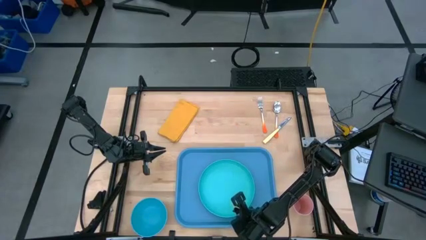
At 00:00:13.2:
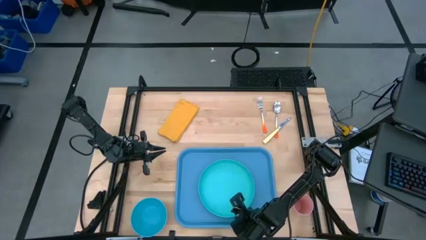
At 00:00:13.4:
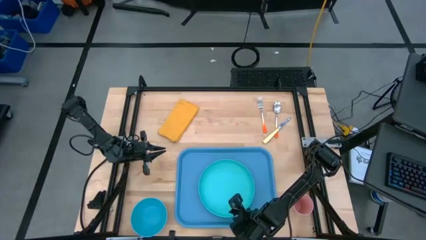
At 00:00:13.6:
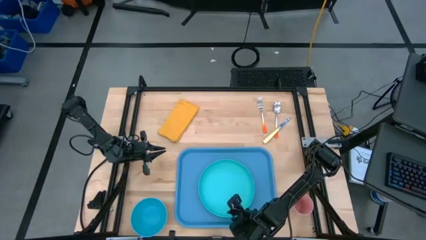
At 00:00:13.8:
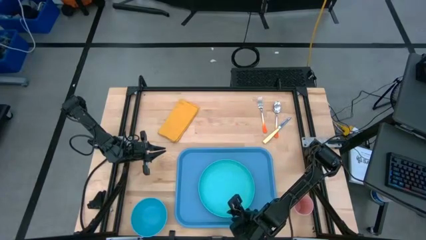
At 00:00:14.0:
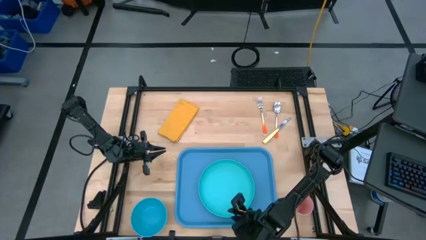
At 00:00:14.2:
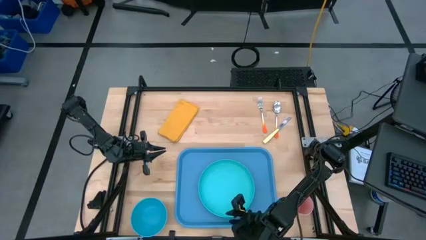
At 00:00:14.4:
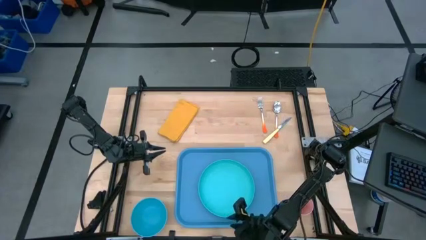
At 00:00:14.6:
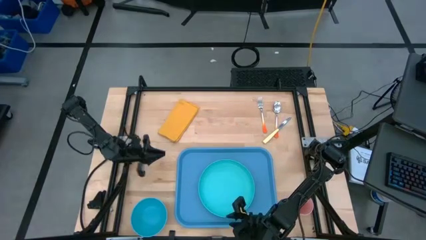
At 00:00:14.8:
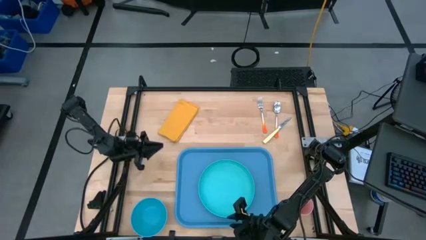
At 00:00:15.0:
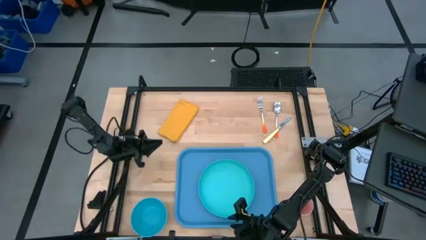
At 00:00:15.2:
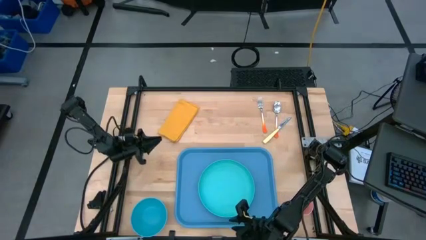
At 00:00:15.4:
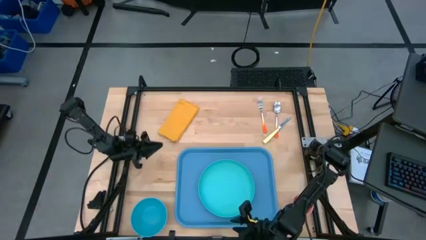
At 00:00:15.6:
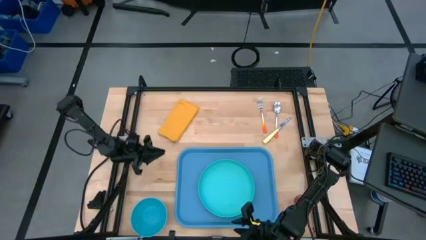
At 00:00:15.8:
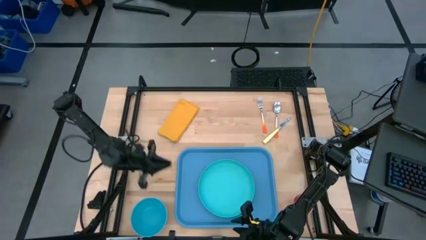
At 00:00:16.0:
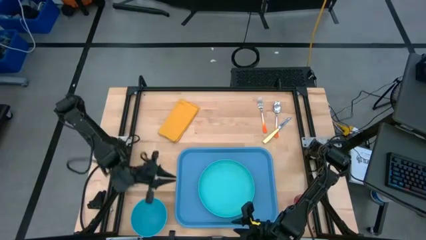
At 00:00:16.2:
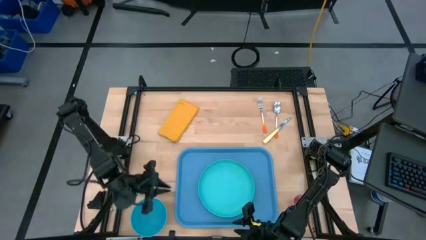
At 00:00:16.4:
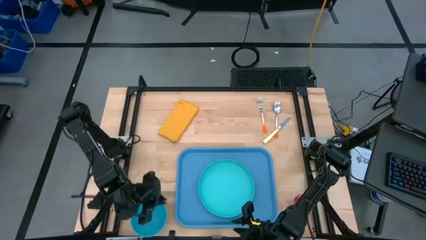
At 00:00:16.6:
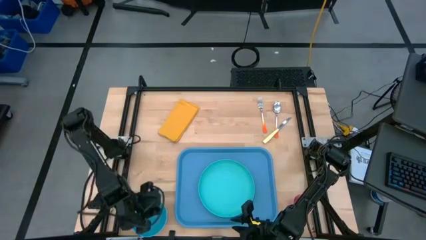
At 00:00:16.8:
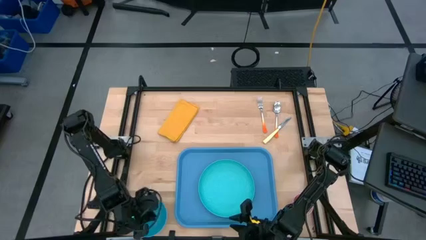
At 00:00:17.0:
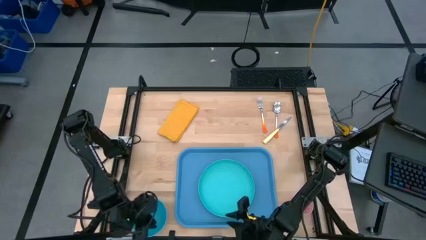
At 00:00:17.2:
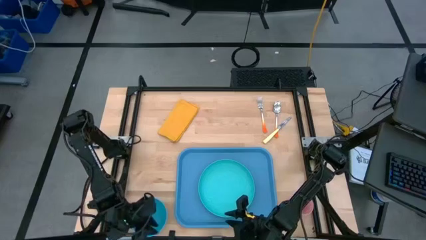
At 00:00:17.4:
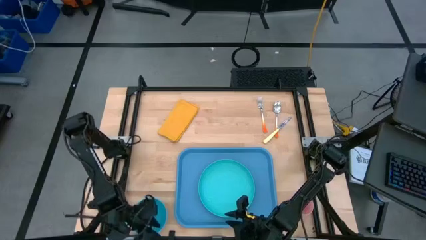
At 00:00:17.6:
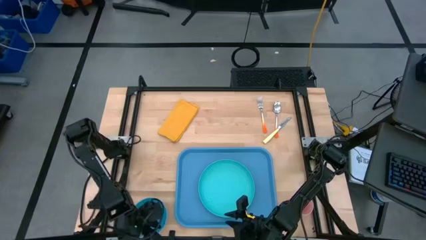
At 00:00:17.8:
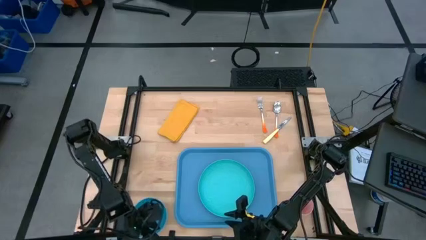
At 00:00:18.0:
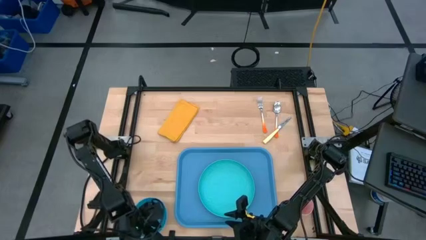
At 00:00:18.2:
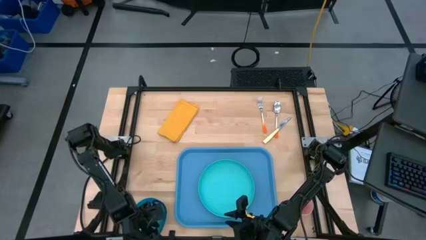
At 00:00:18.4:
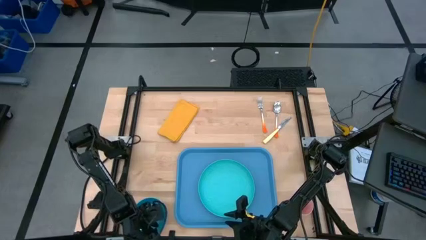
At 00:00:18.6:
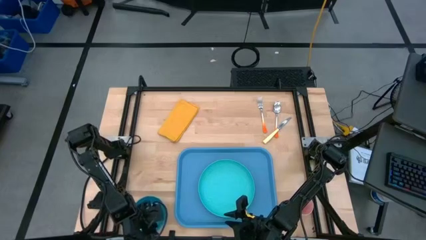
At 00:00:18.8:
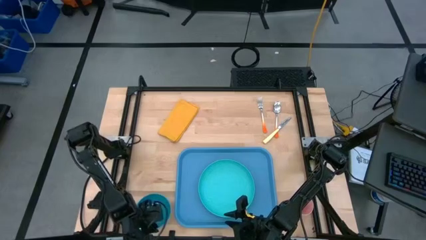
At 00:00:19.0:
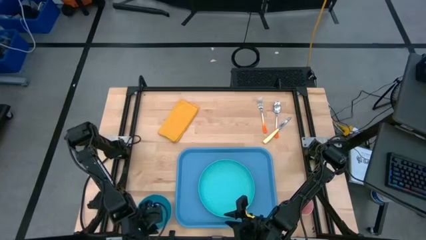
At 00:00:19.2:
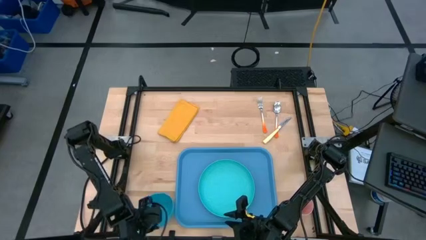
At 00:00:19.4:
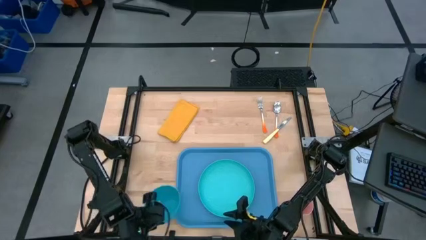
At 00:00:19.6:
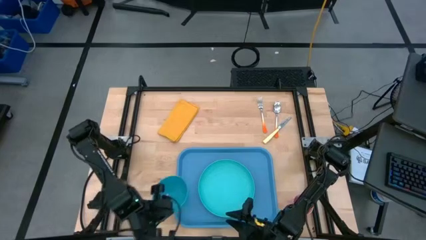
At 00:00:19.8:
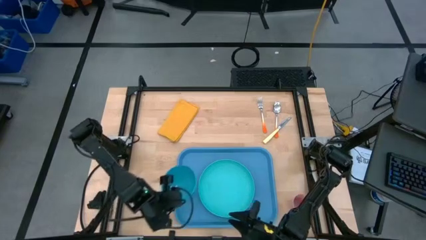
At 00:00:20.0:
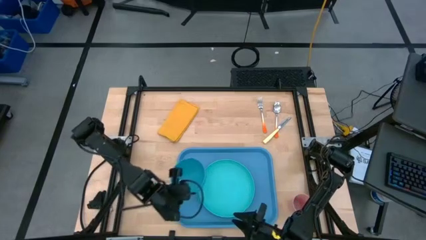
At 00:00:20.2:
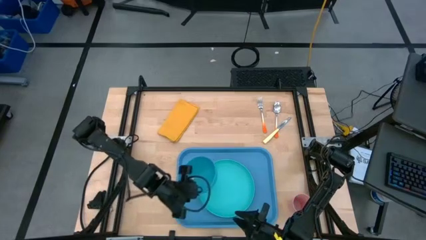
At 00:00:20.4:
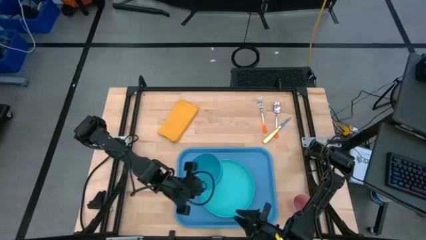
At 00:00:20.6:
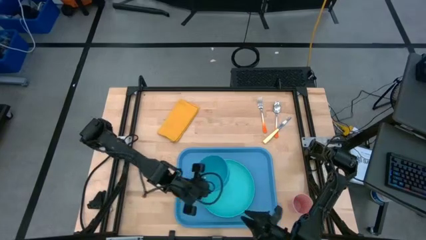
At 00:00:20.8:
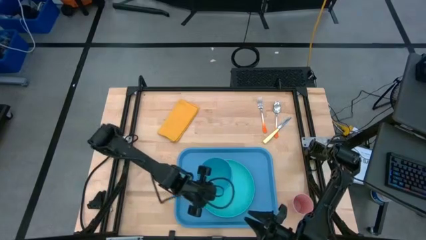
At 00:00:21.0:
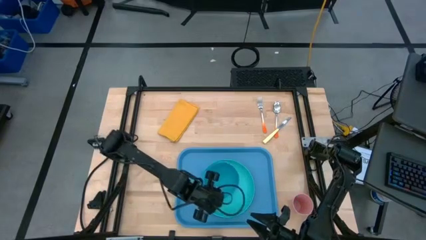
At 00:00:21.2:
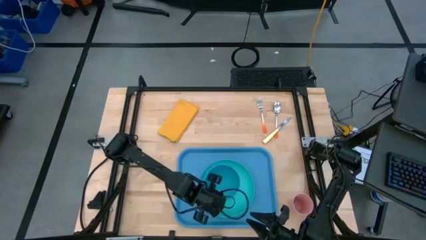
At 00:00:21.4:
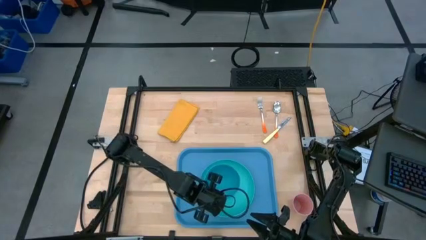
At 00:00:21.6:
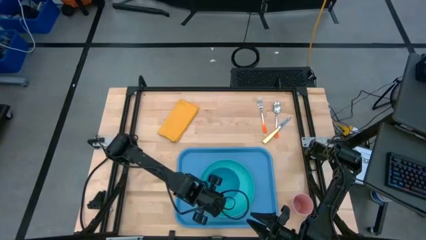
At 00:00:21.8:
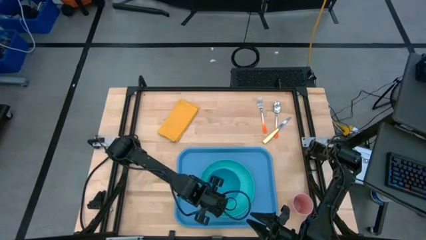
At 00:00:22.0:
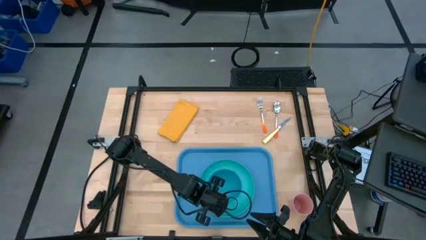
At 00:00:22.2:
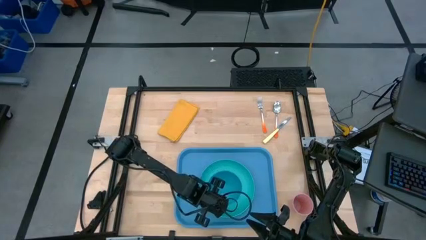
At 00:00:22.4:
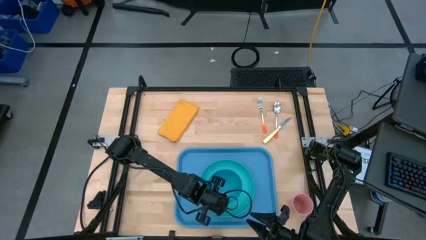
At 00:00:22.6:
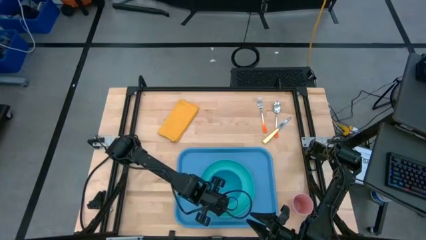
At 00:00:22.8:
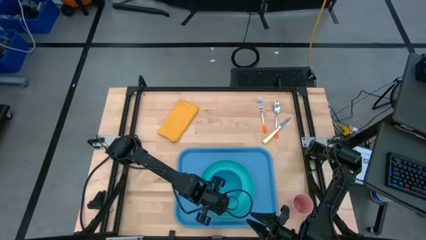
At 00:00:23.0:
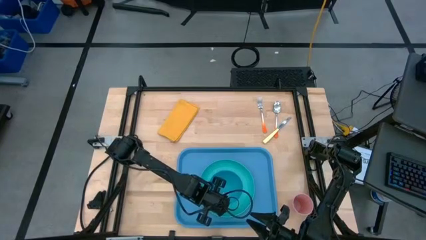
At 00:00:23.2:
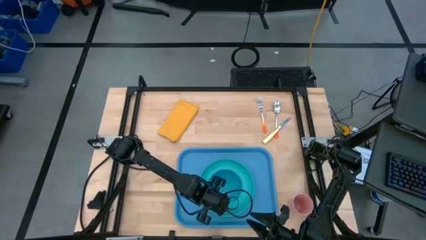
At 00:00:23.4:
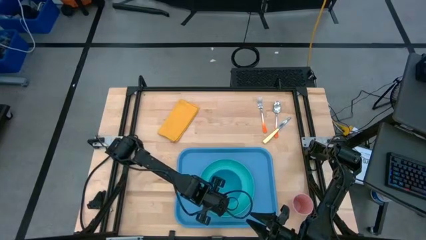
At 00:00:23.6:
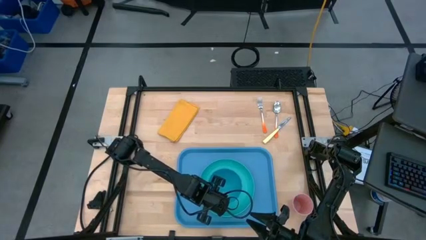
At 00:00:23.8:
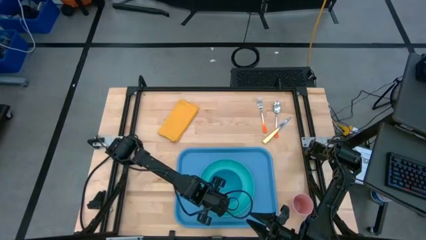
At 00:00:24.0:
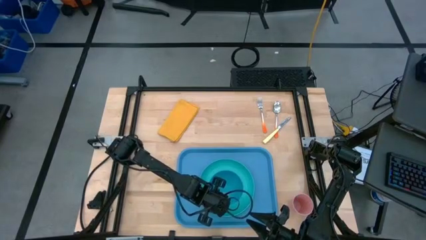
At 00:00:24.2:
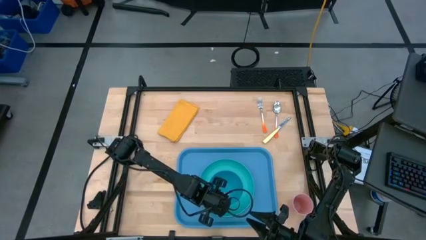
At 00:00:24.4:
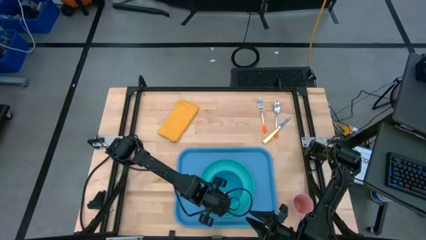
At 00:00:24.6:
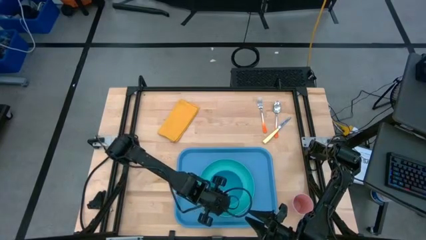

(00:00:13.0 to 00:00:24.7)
Task: Set up tray
Stack the bowl on top of the plate

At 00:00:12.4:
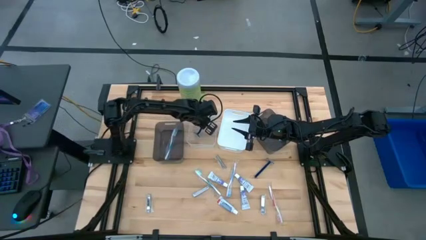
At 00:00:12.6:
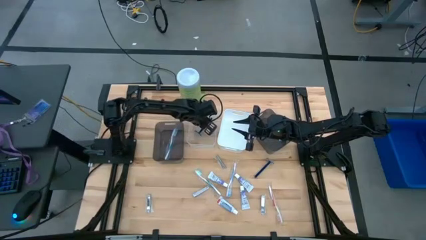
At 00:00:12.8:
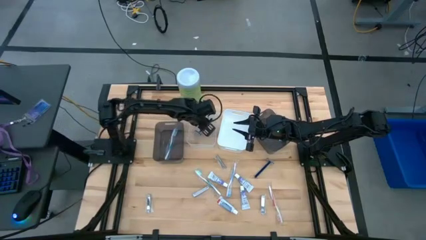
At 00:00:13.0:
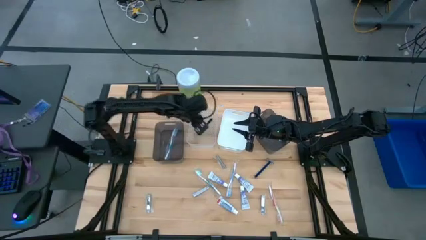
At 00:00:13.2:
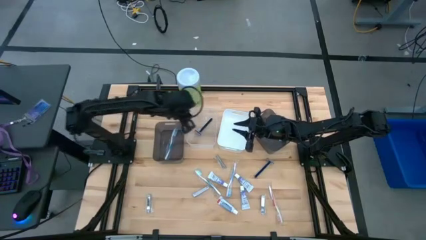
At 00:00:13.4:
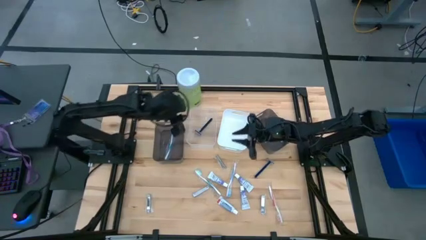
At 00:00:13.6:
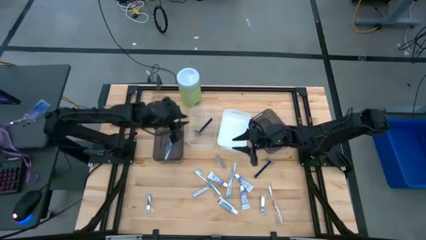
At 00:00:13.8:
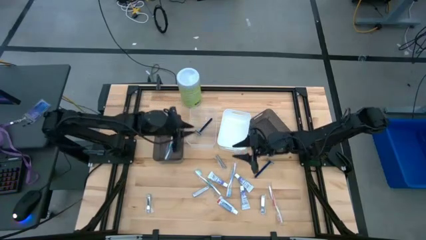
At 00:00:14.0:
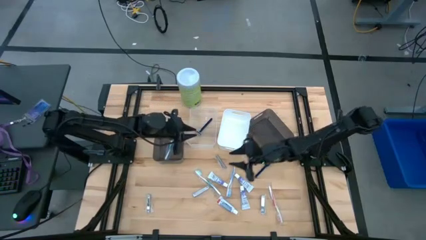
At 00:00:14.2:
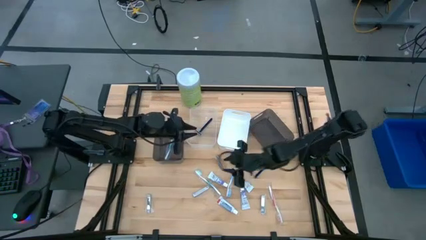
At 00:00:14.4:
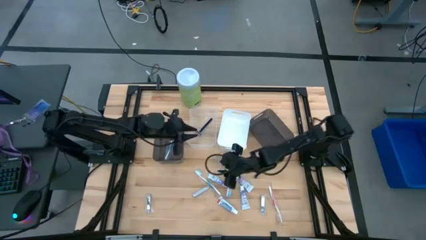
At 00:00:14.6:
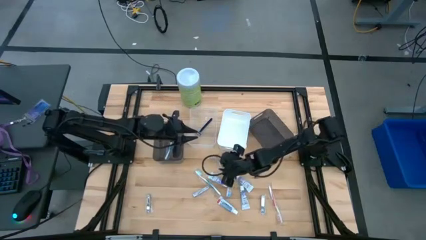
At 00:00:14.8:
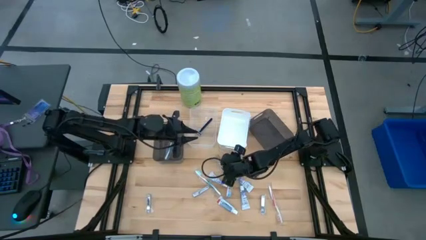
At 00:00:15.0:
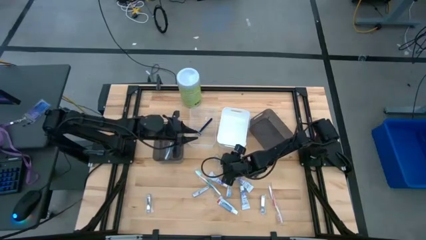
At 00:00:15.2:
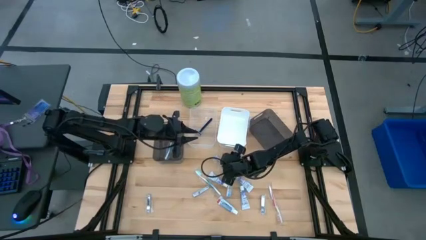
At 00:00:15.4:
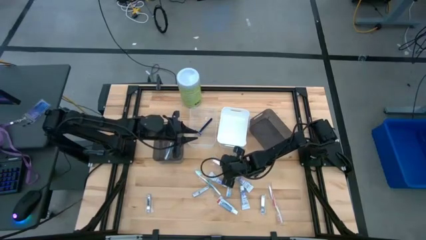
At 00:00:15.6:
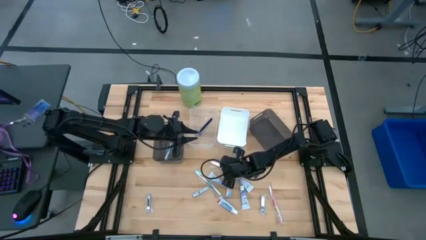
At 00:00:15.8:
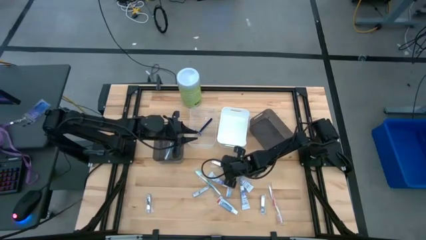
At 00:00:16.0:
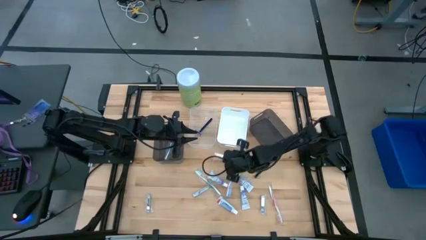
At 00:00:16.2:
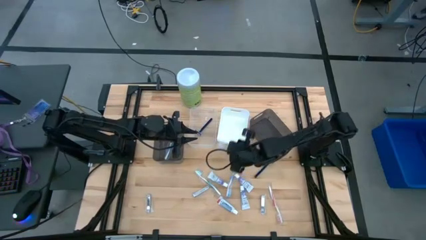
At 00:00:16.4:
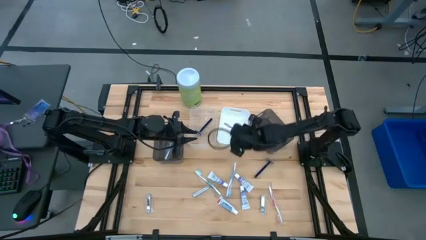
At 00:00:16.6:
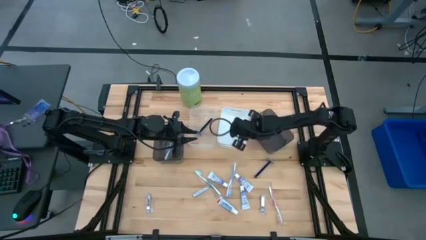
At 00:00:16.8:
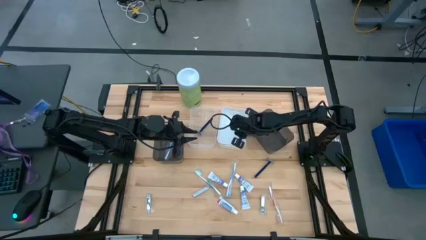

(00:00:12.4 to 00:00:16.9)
Task: Pick & Place Travel size toiletries
Put the silver nail cutter into the white bin
